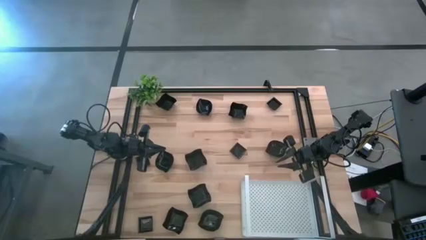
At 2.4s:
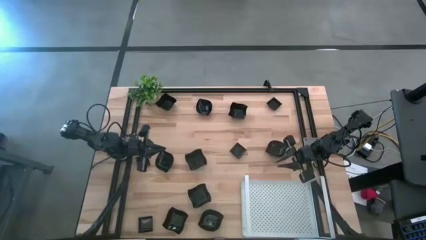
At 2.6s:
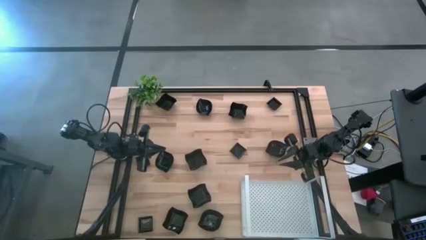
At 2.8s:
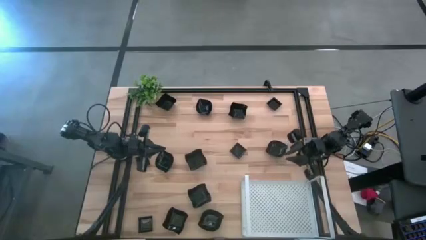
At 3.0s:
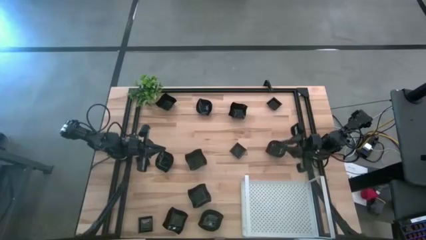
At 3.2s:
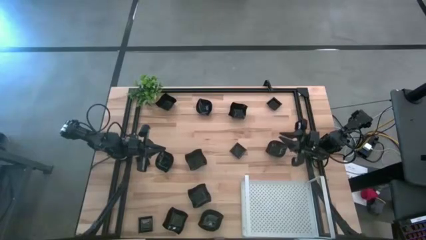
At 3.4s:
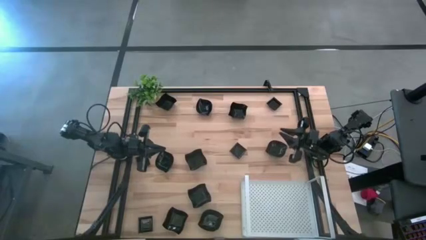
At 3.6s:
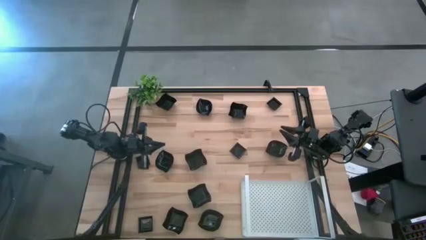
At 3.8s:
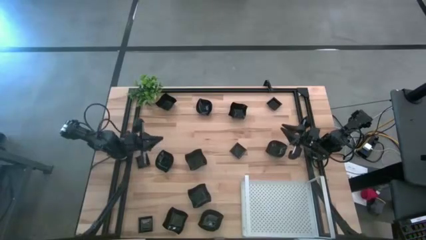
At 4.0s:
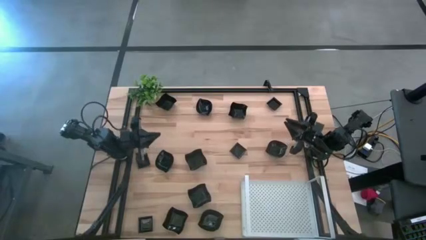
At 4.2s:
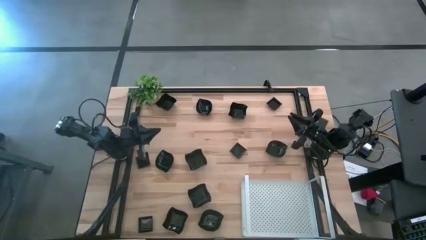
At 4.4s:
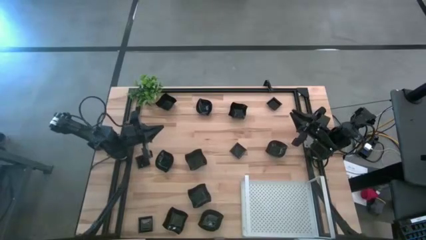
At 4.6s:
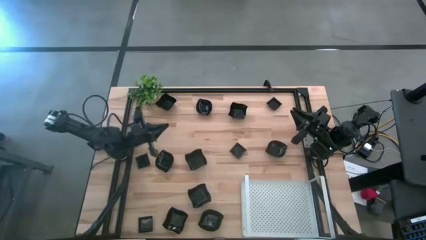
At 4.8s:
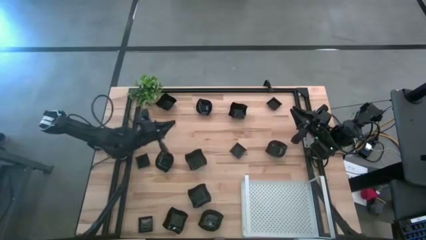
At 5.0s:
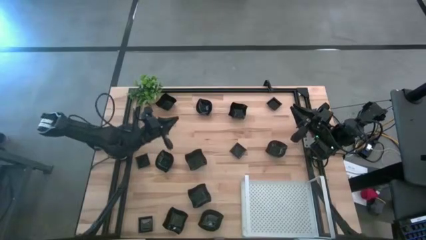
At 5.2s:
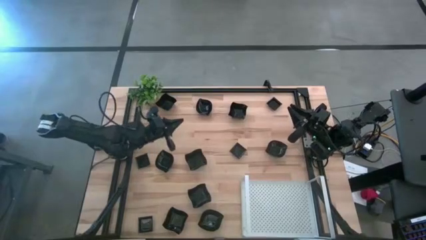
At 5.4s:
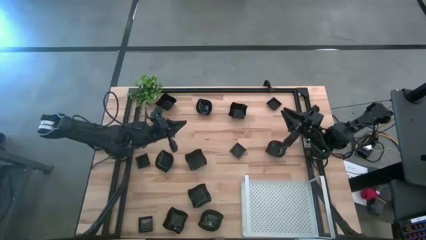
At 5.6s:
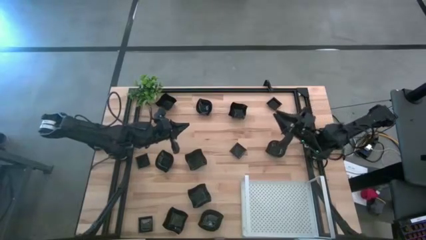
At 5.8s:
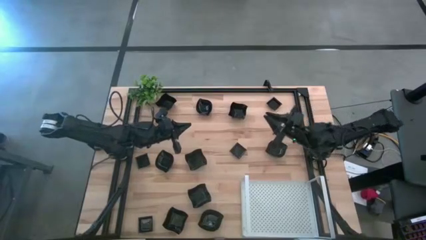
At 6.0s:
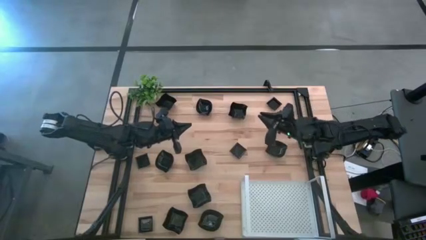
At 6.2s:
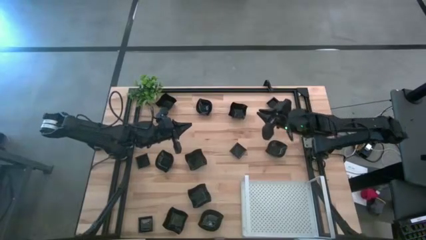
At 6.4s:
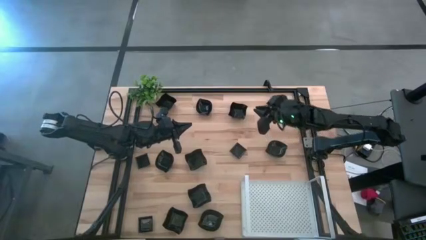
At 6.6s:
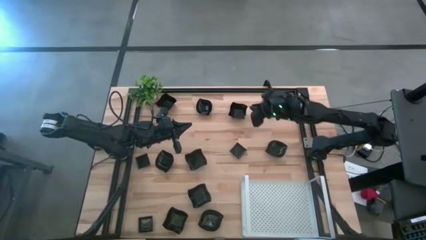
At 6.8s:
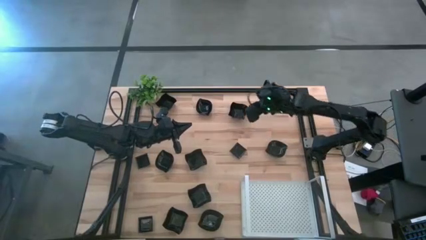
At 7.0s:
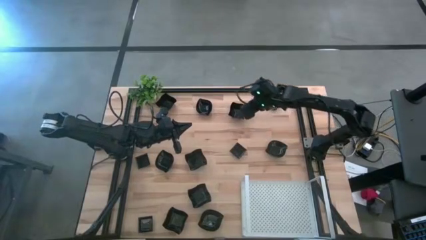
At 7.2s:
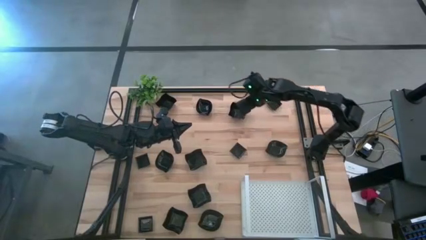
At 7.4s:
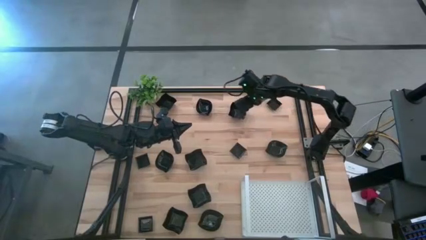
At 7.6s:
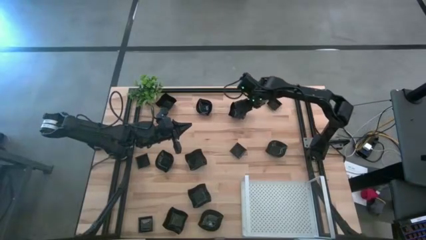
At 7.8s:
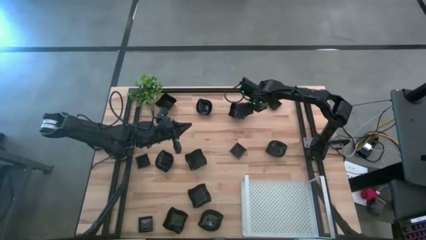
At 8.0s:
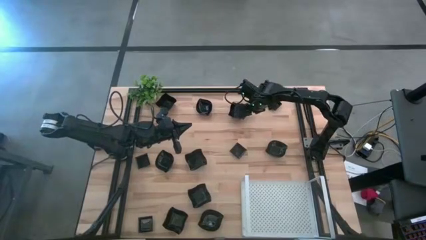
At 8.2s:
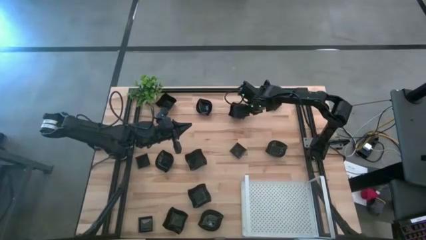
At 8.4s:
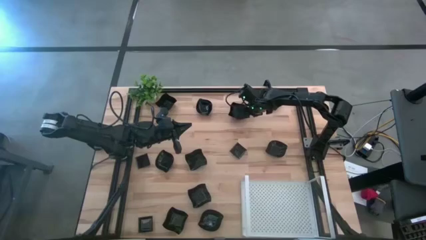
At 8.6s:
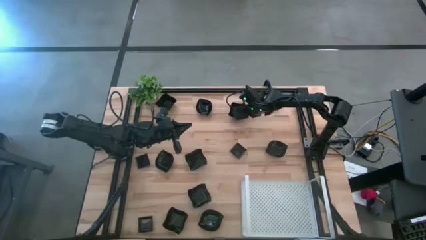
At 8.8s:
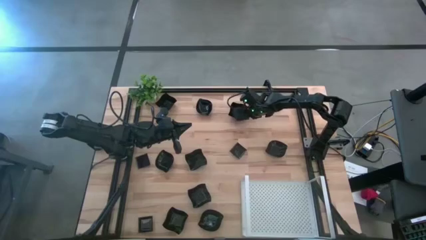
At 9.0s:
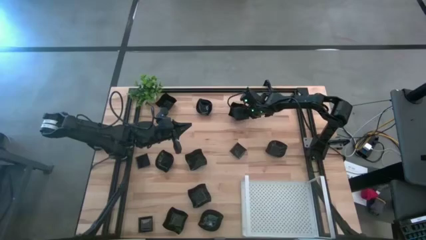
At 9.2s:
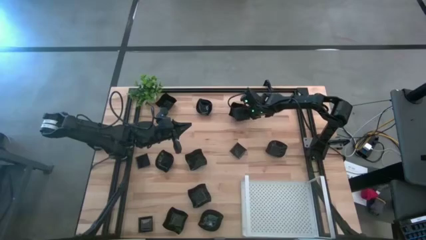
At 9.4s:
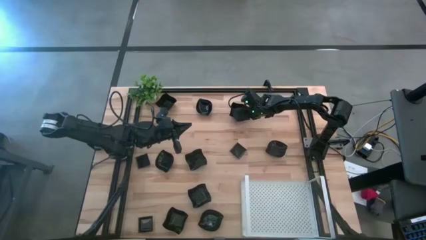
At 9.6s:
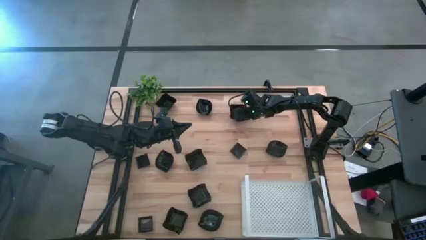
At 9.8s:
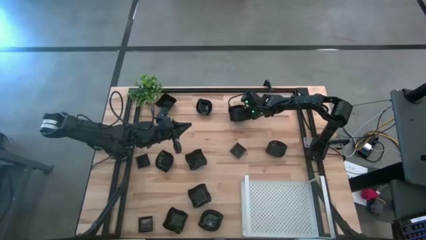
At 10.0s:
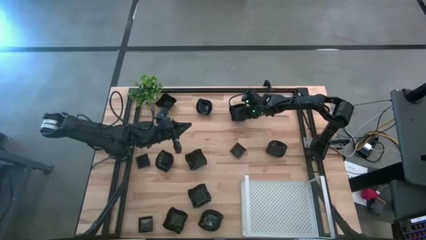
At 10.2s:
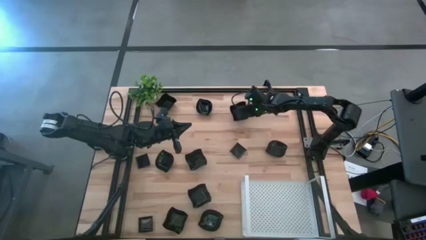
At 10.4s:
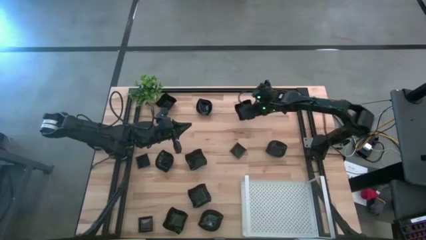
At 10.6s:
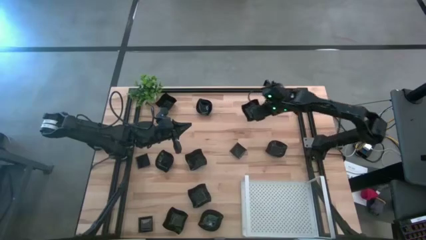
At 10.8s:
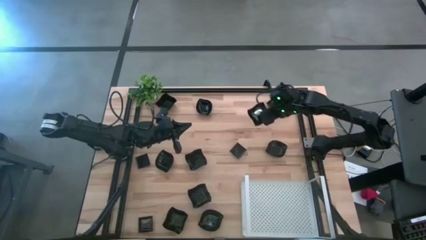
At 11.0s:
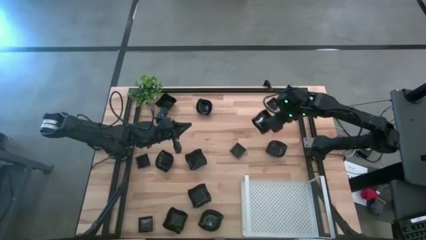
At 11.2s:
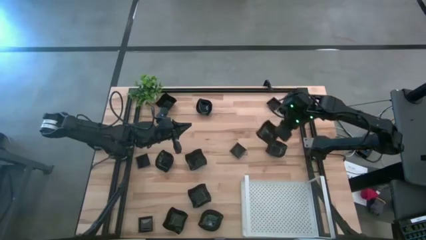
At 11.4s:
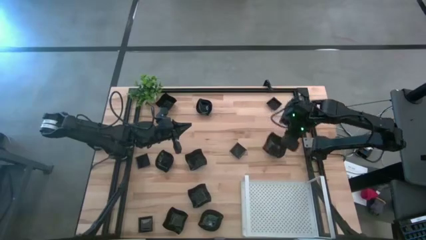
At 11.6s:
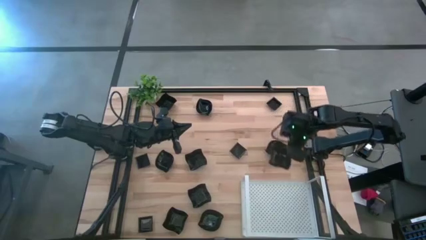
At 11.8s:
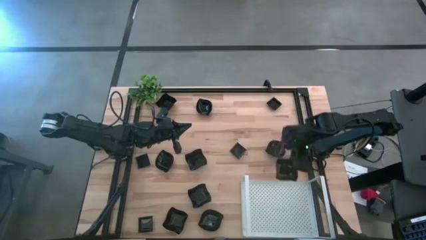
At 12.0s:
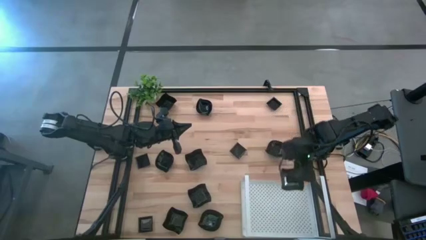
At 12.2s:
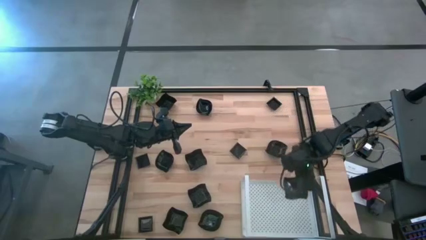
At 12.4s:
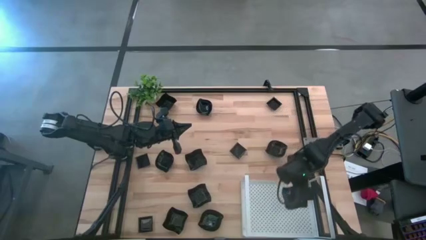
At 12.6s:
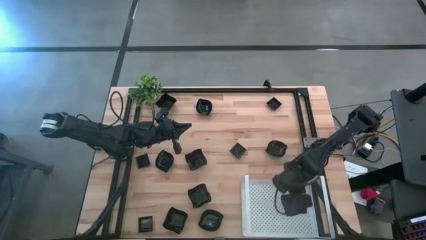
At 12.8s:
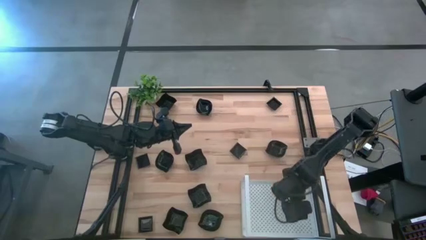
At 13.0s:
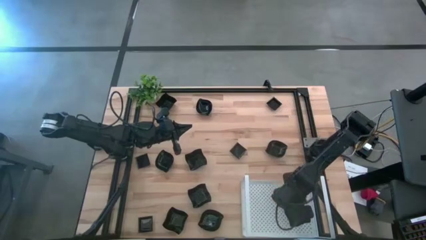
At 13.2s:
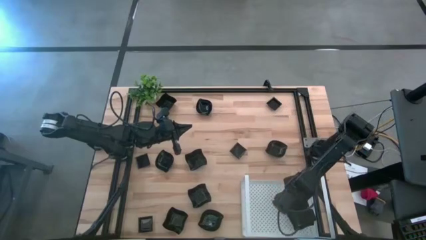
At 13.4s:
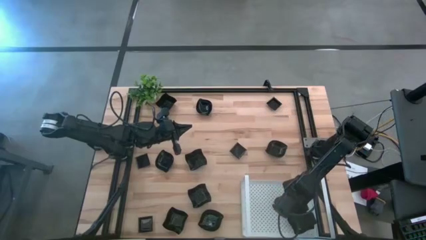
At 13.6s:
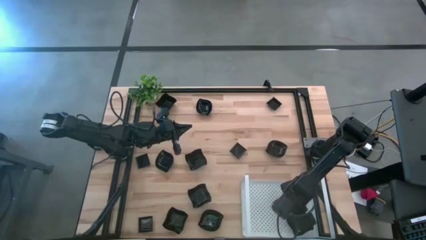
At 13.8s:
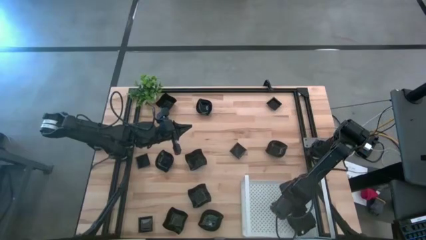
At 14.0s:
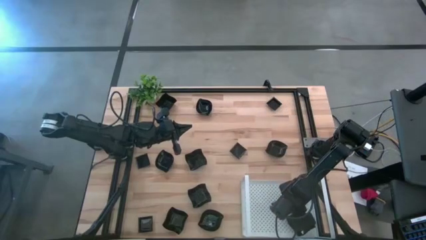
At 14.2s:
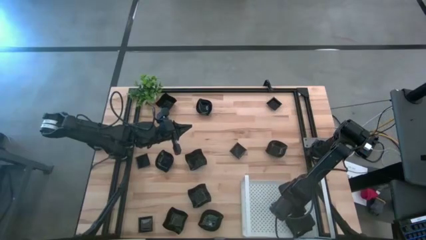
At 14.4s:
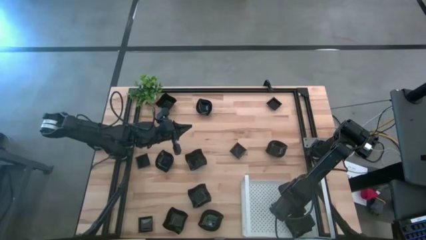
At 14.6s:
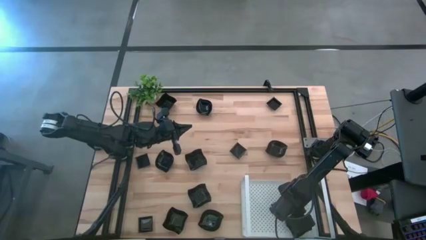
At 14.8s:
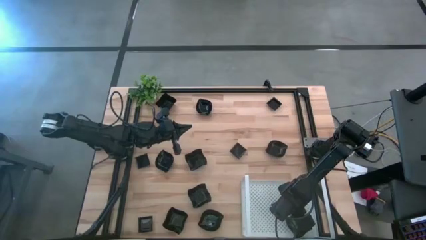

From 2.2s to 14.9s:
Task: Pick & Place Mini shaped plates
Put the distorted square plate on the shelf
